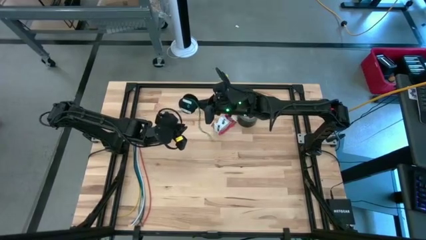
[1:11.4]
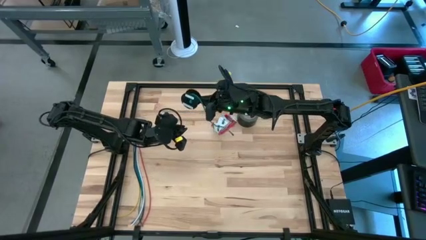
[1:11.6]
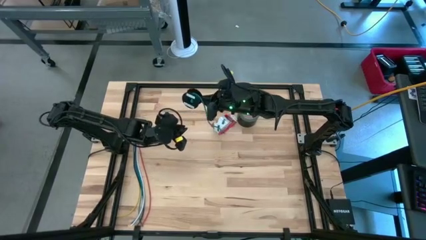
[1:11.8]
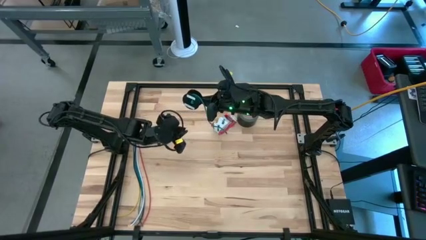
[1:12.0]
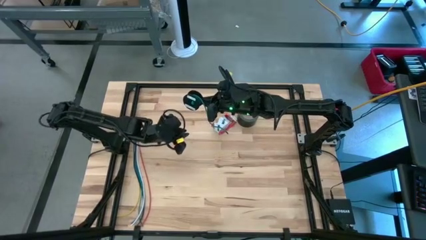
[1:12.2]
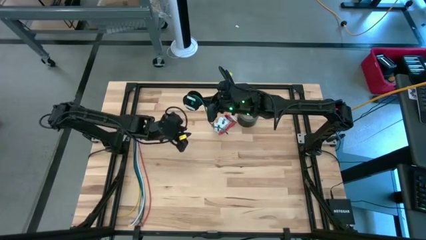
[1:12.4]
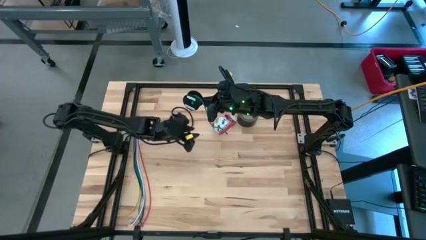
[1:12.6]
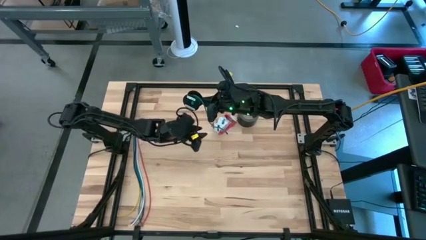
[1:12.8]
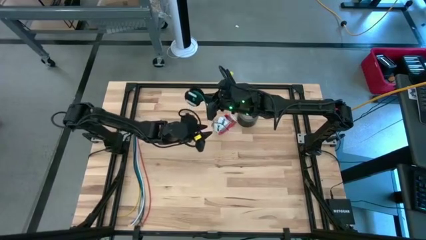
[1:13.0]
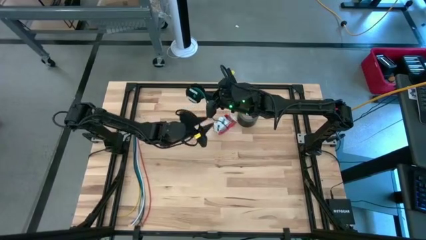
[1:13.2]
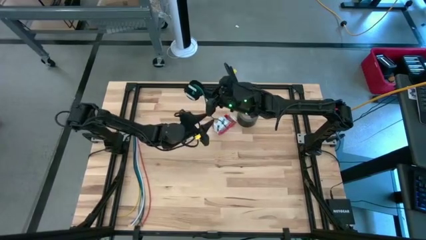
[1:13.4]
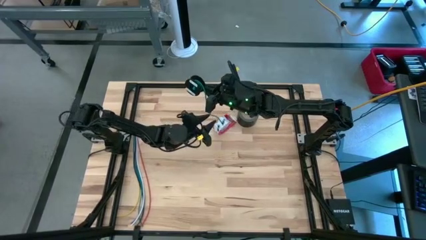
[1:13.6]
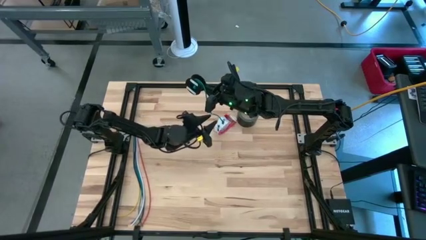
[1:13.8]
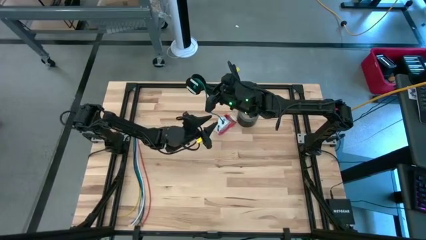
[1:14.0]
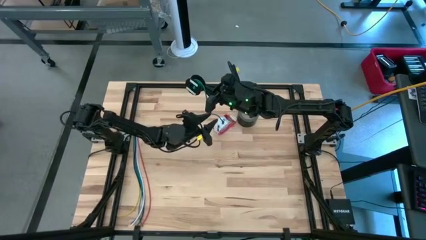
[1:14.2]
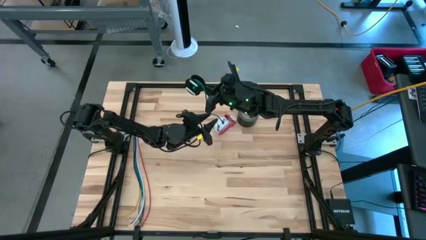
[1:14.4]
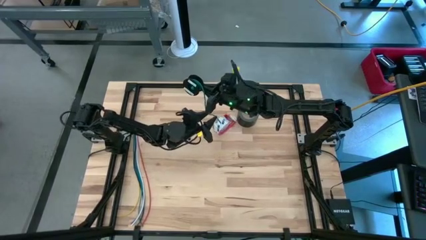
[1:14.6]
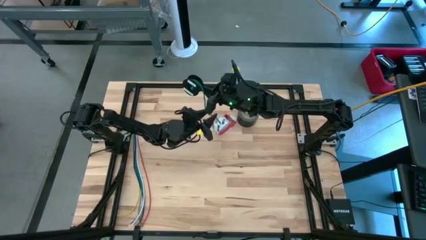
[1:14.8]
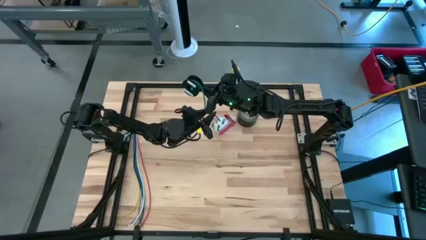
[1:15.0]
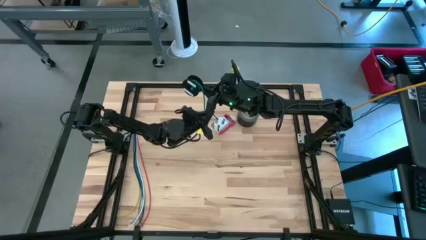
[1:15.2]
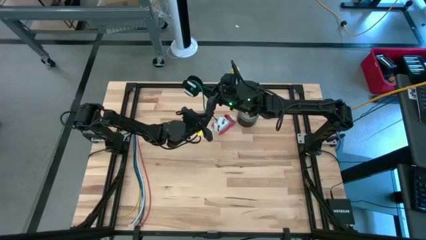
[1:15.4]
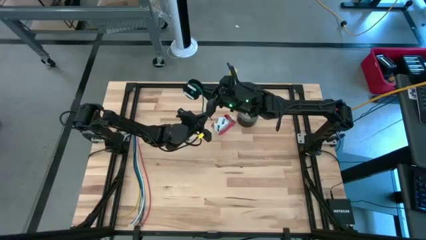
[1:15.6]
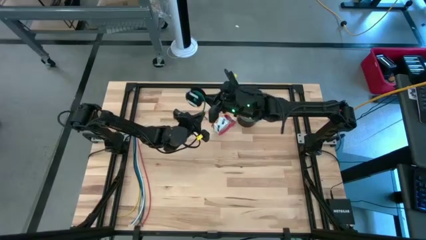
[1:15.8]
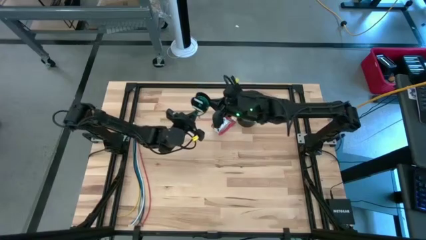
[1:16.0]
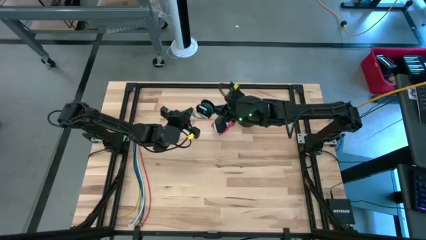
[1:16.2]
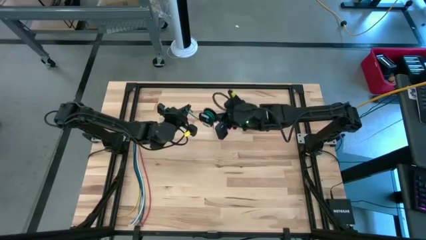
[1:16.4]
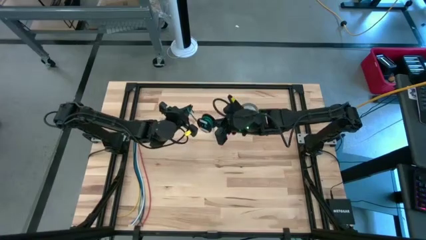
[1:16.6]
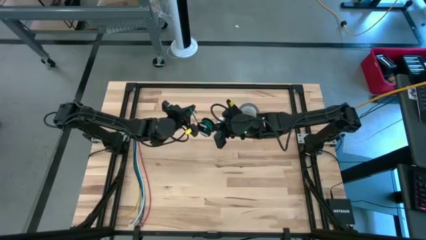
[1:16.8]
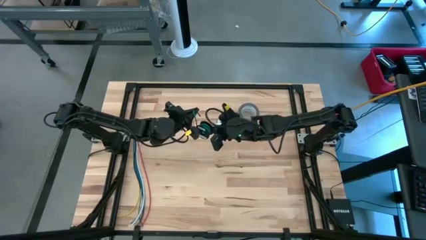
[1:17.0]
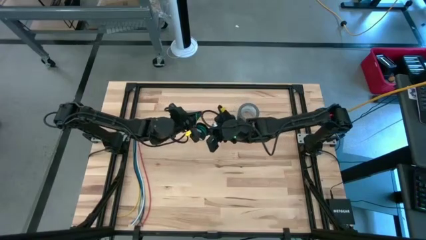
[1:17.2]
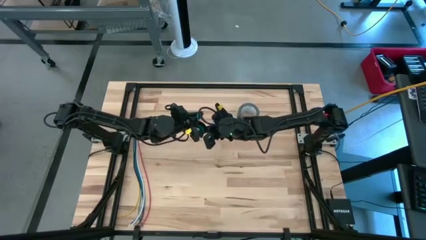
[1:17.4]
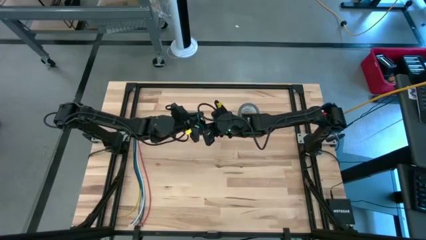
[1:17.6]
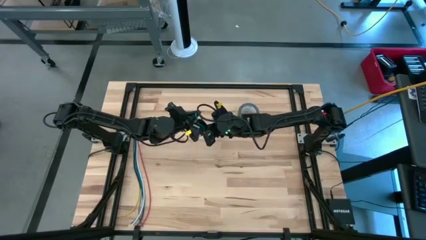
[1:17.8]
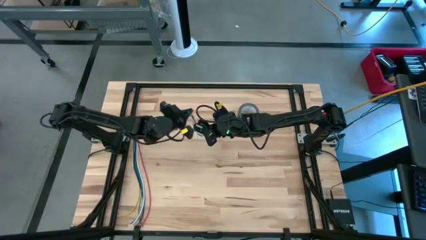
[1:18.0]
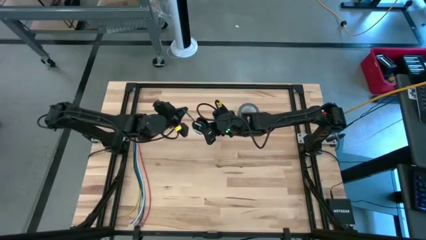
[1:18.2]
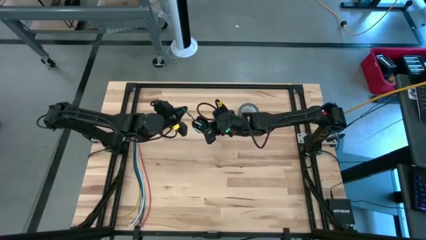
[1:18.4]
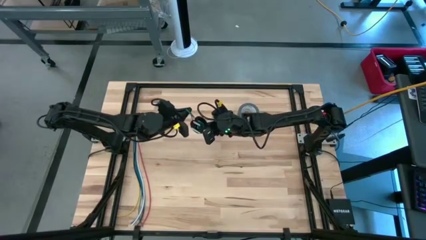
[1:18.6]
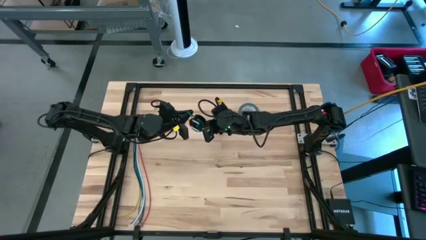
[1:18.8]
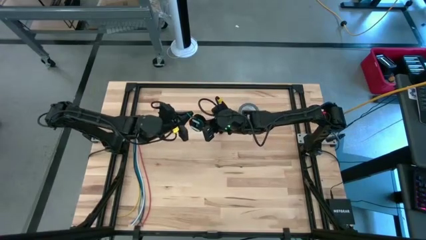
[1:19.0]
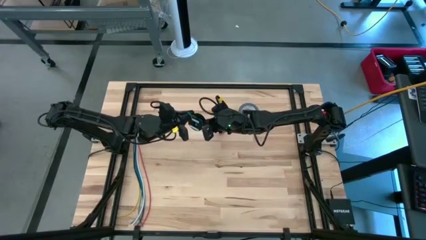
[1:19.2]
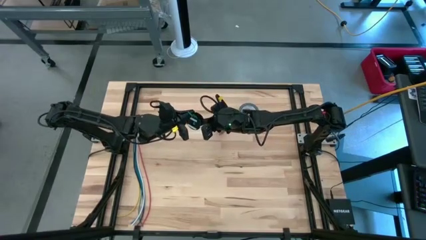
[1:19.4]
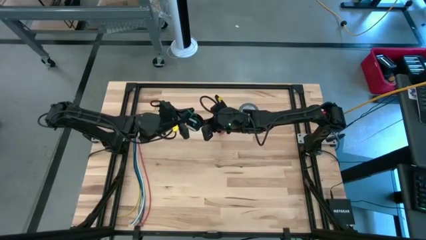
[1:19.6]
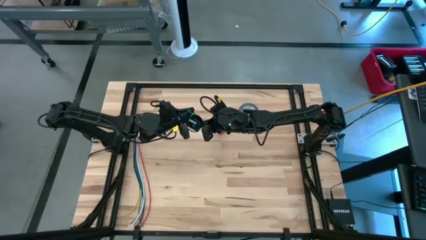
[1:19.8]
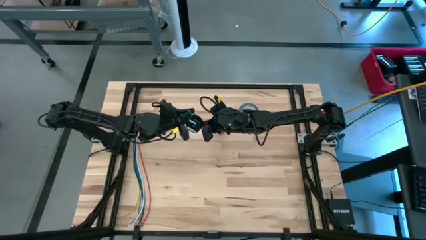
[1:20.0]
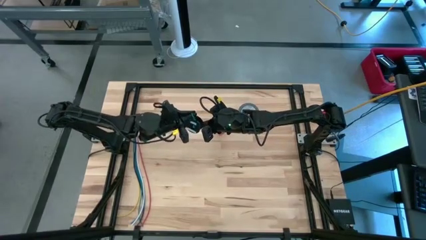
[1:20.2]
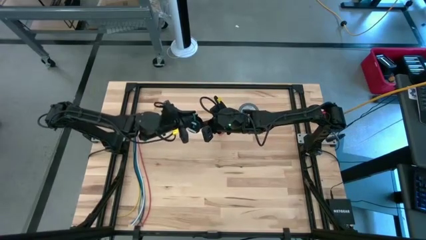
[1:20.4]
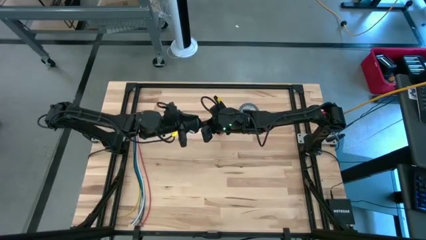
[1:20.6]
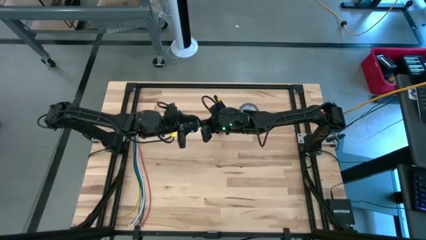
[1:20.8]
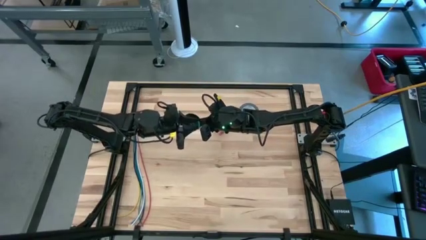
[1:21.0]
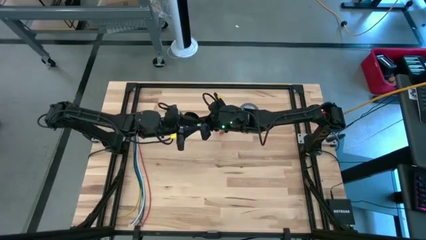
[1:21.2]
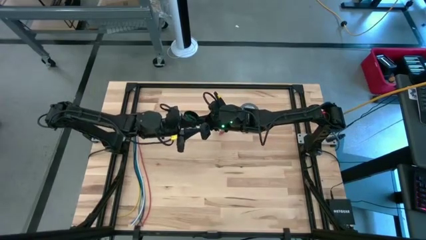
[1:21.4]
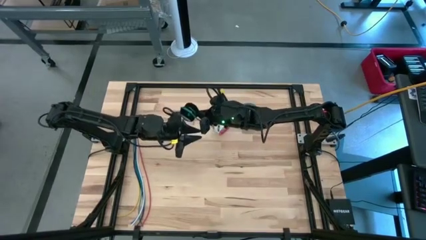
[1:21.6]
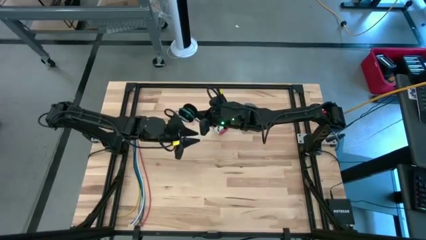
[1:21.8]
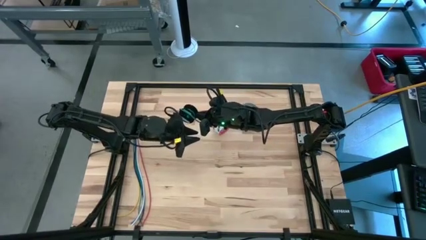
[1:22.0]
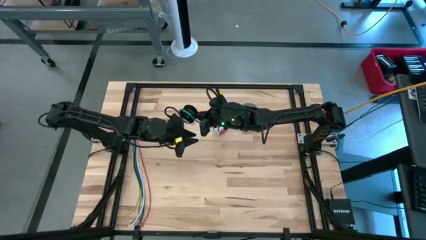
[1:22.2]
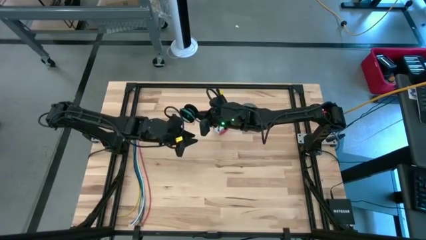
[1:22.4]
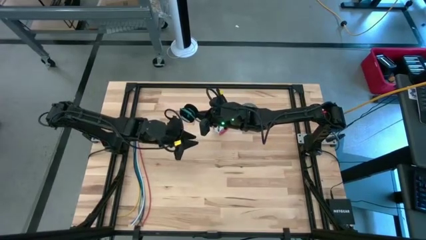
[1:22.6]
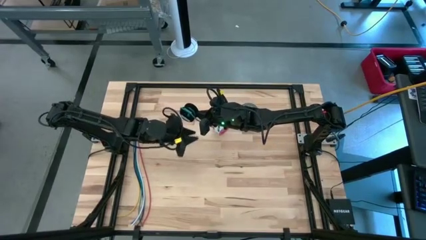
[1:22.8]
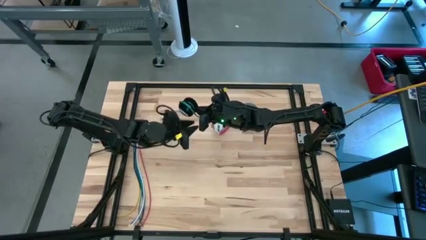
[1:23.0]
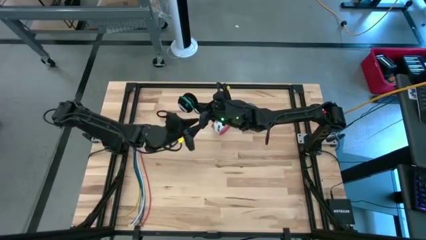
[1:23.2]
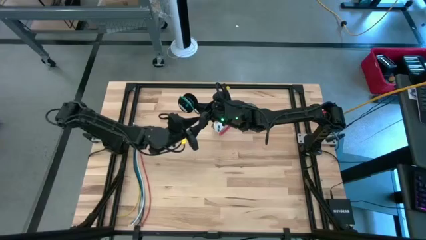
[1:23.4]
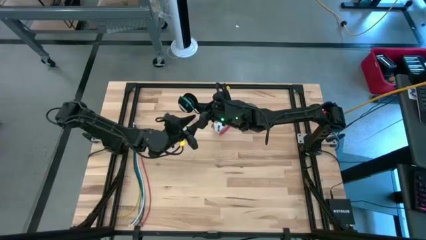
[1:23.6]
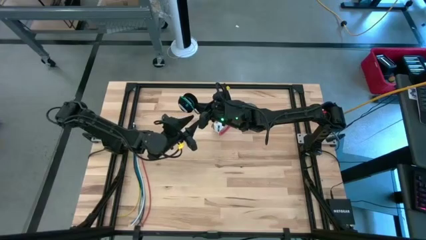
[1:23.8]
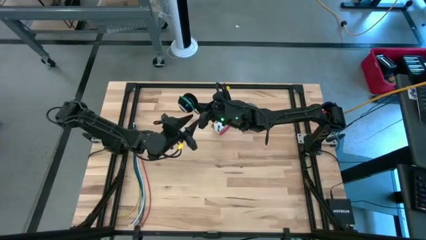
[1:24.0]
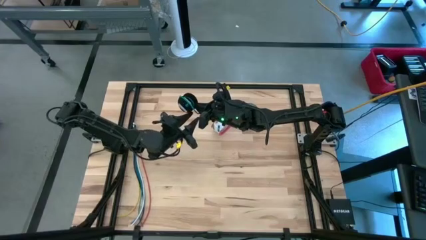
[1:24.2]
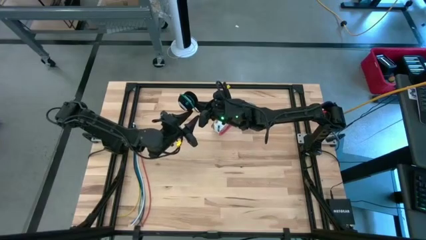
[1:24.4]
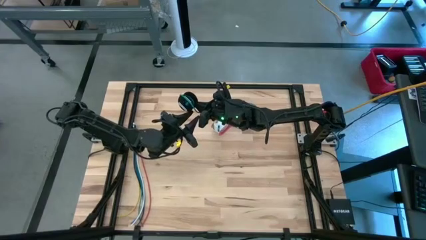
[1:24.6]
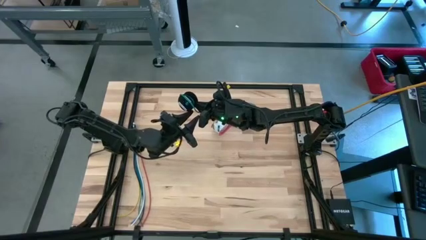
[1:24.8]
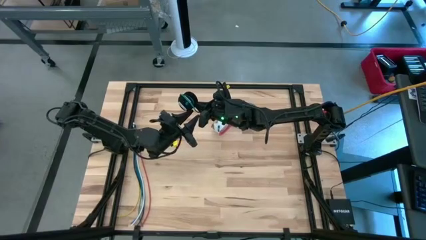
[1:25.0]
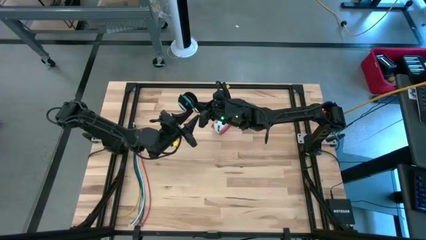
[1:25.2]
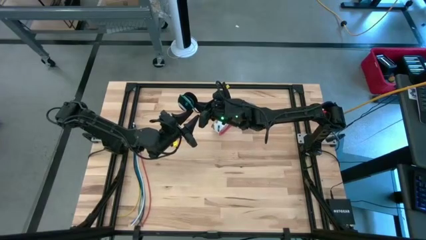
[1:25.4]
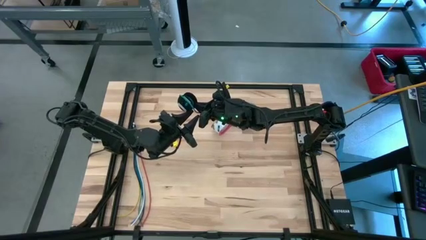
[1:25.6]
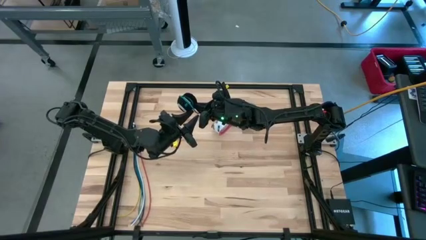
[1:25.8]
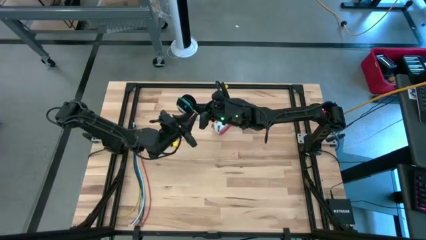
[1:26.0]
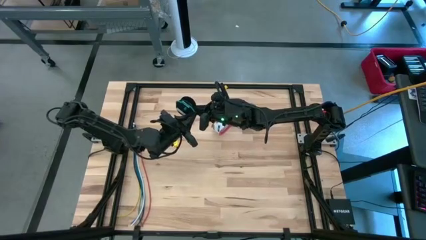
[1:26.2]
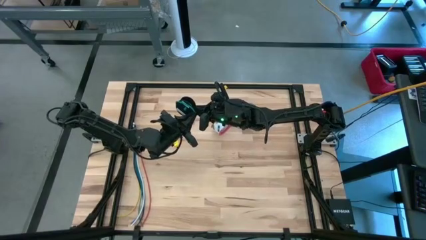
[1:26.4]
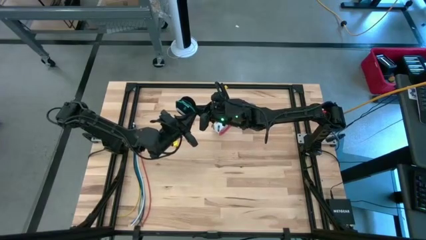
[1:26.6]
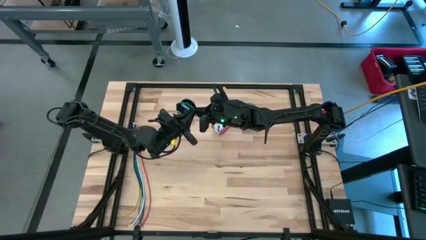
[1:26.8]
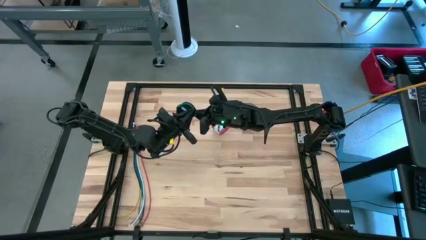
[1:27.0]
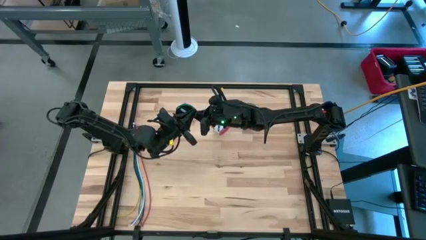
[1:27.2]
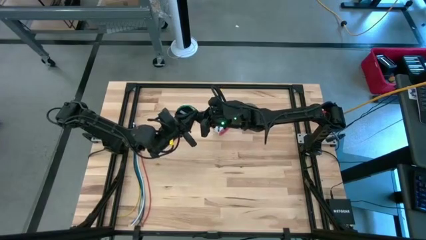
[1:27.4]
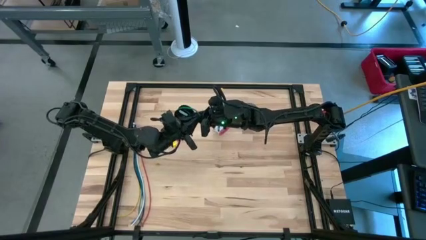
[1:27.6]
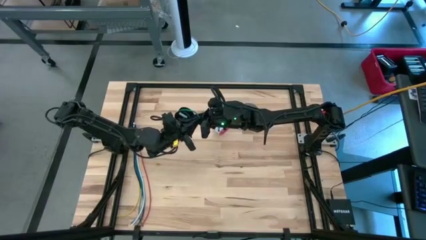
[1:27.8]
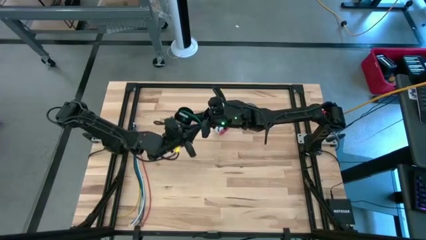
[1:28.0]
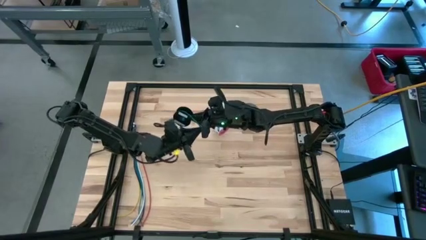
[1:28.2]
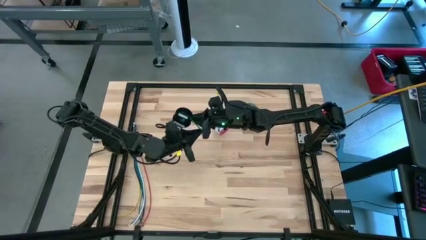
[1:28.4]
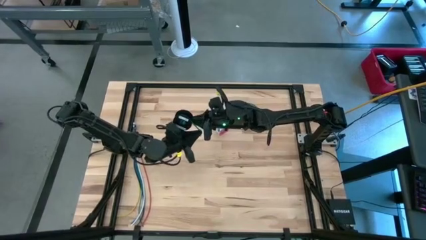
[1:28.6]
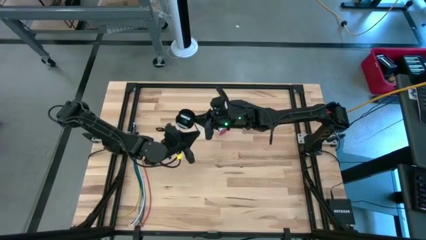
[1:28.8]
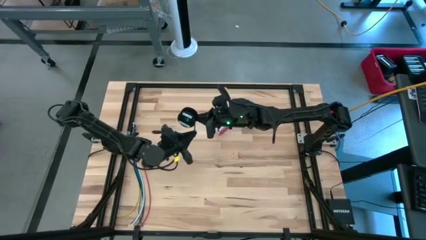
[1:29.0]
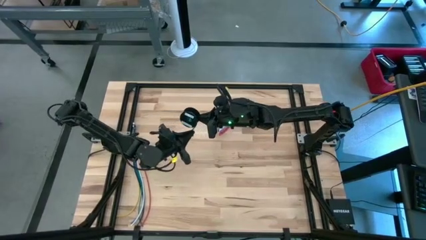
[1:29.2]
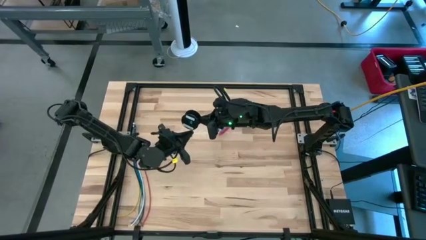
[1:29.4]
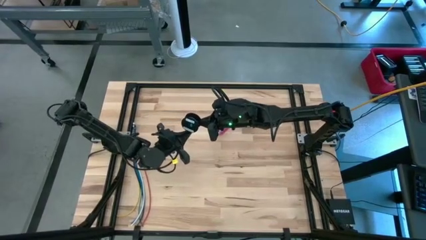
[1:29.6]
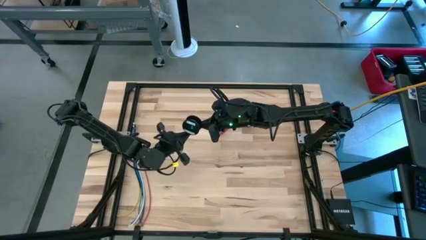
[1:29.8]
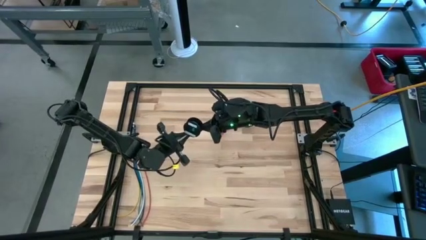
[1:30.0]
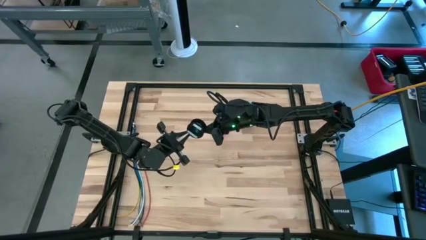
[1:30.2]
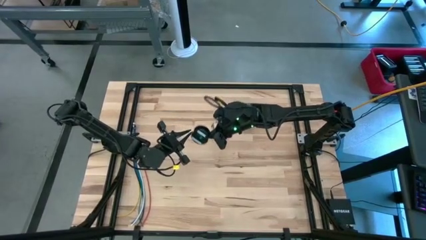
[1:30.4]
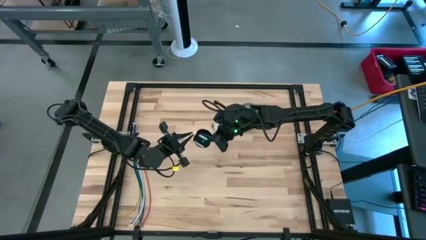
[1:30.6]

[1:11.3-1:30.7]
Task: Coil cords
Coil the green wire on the spool
